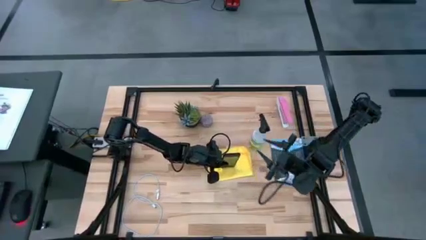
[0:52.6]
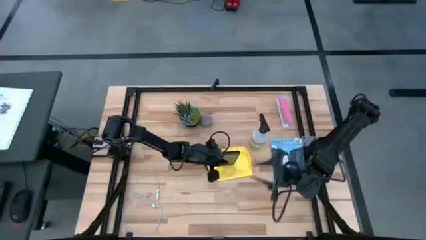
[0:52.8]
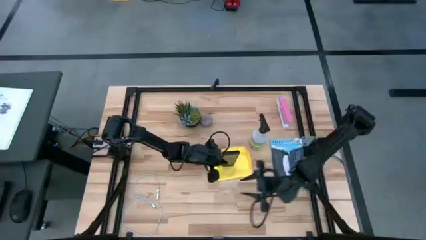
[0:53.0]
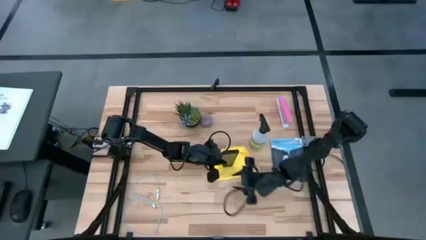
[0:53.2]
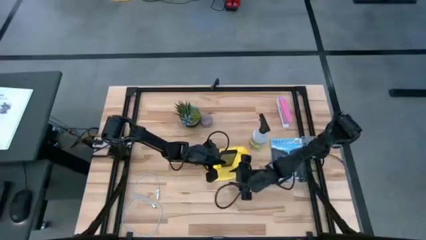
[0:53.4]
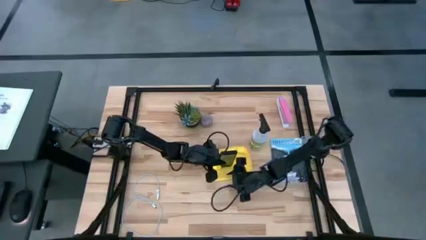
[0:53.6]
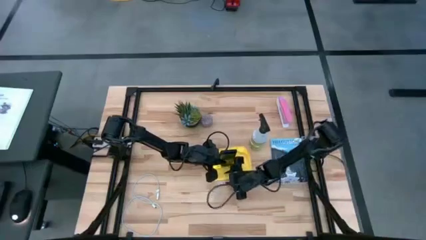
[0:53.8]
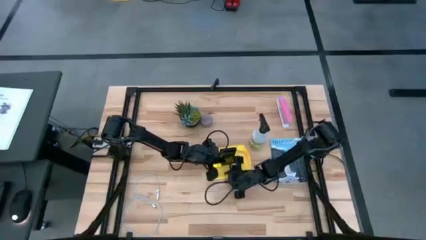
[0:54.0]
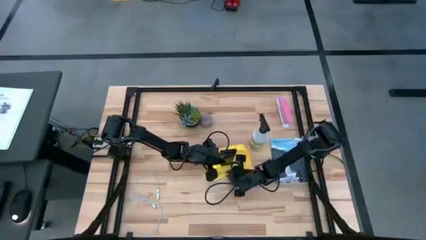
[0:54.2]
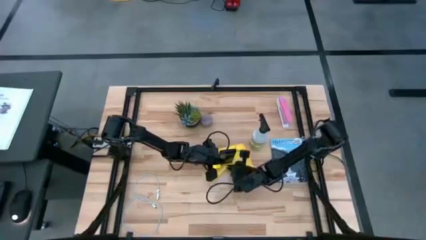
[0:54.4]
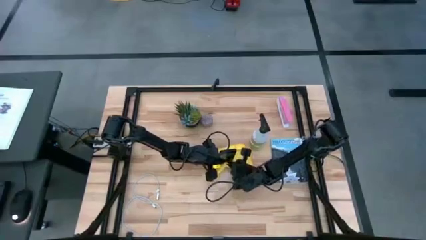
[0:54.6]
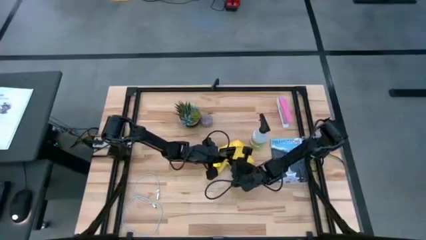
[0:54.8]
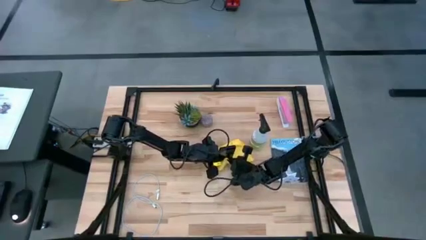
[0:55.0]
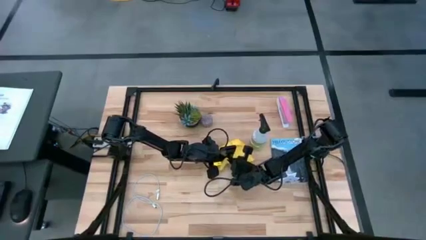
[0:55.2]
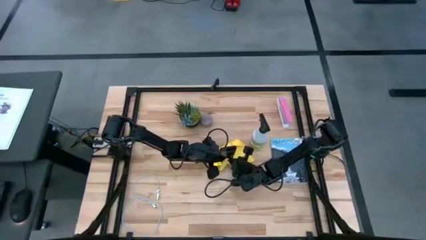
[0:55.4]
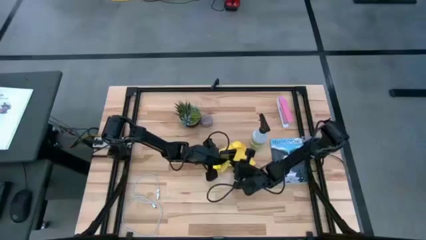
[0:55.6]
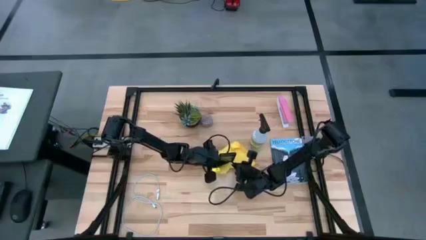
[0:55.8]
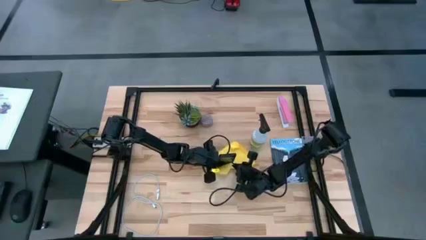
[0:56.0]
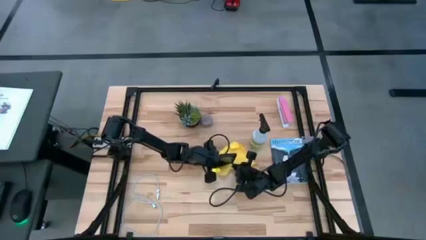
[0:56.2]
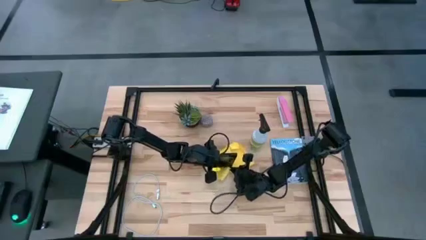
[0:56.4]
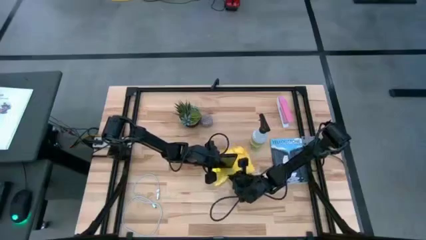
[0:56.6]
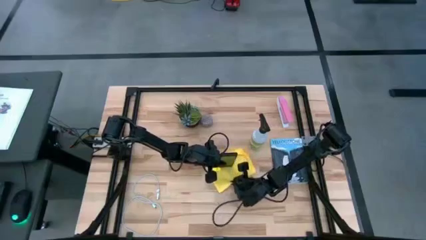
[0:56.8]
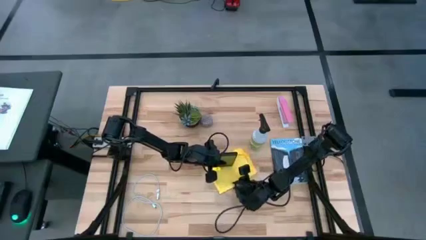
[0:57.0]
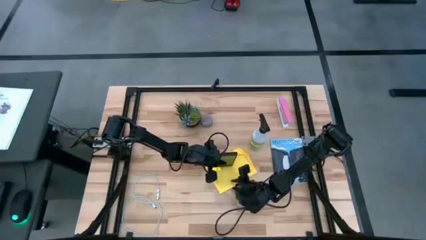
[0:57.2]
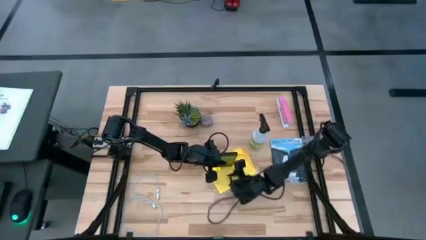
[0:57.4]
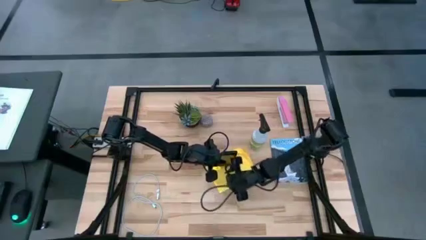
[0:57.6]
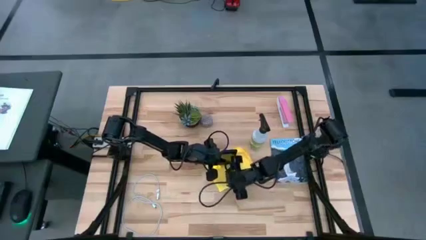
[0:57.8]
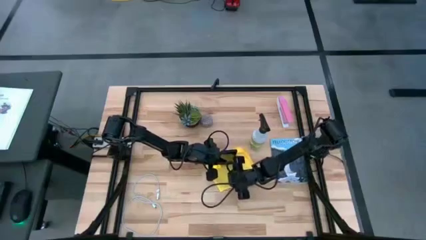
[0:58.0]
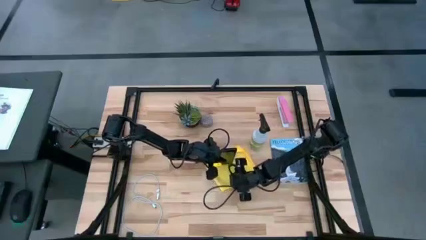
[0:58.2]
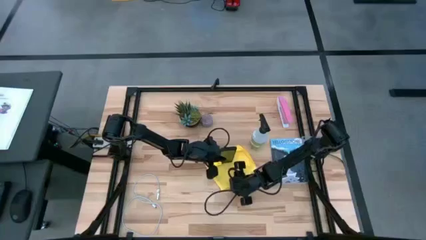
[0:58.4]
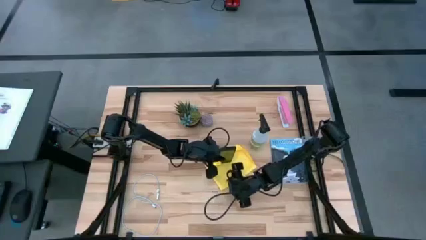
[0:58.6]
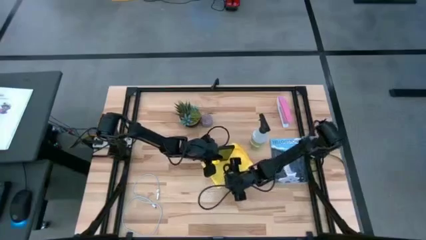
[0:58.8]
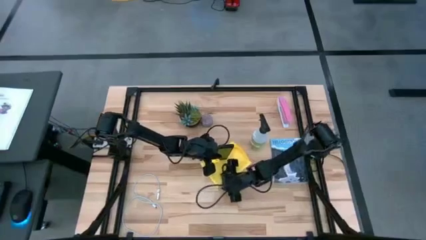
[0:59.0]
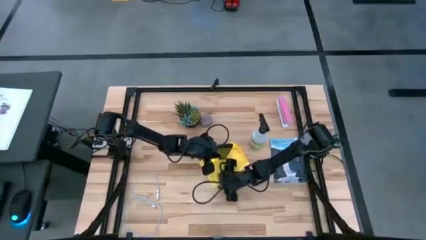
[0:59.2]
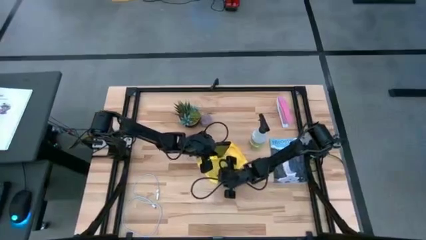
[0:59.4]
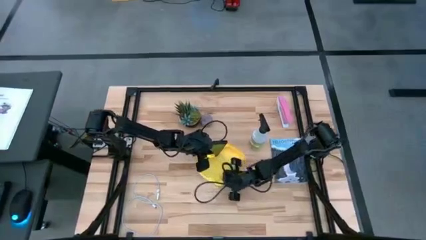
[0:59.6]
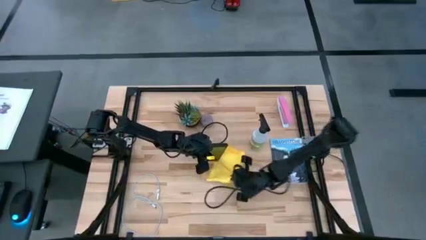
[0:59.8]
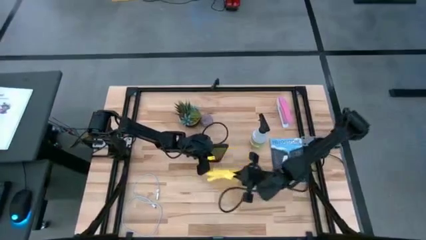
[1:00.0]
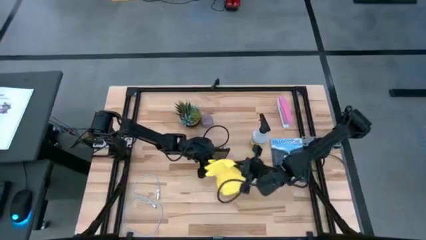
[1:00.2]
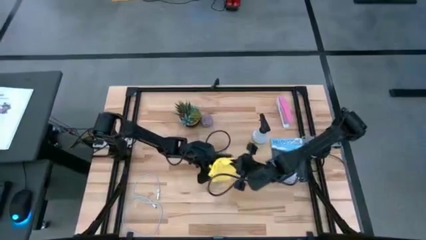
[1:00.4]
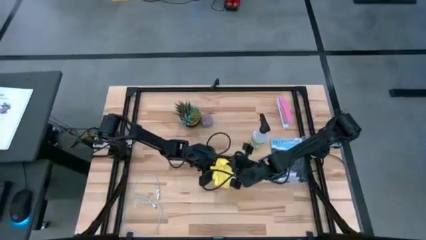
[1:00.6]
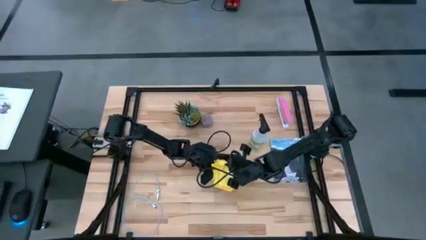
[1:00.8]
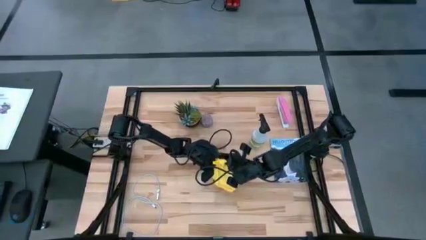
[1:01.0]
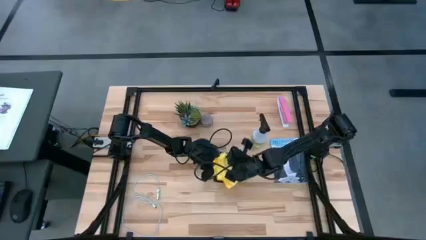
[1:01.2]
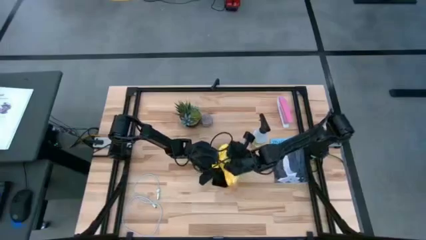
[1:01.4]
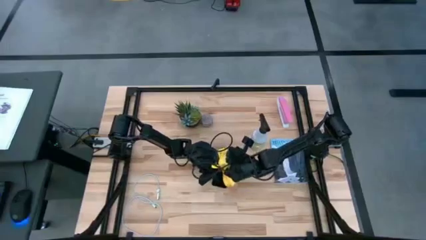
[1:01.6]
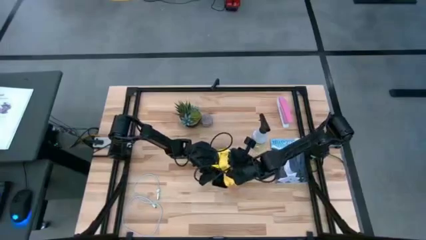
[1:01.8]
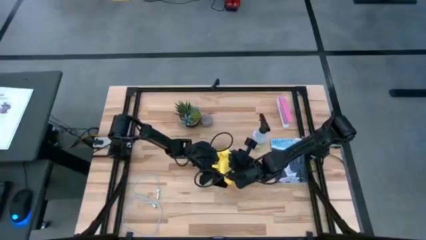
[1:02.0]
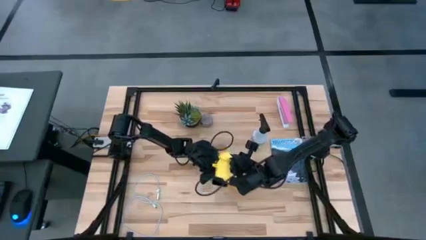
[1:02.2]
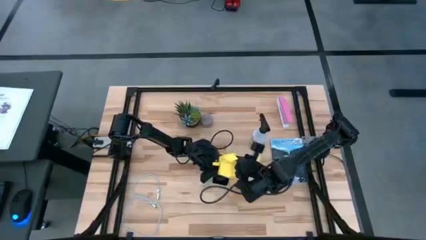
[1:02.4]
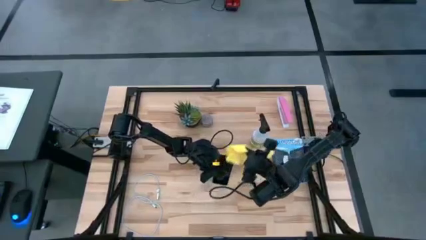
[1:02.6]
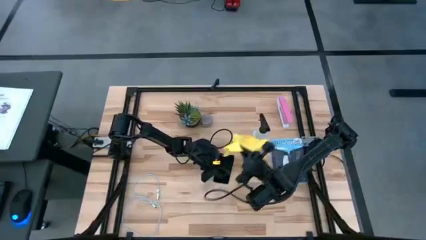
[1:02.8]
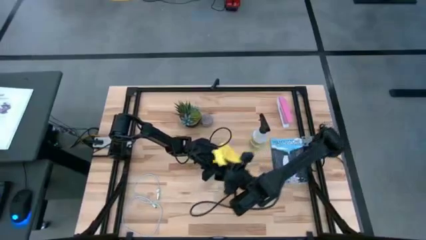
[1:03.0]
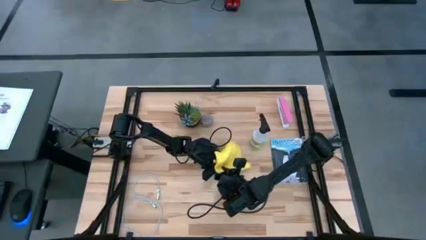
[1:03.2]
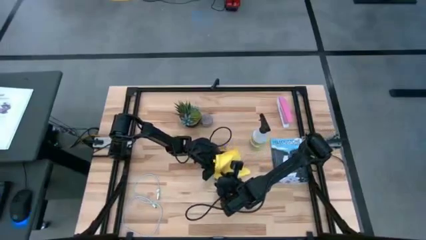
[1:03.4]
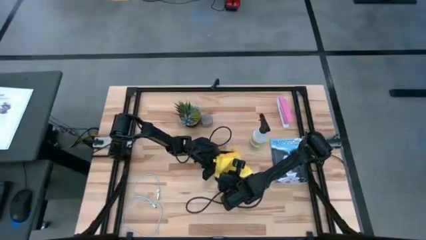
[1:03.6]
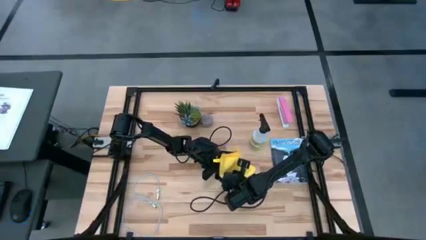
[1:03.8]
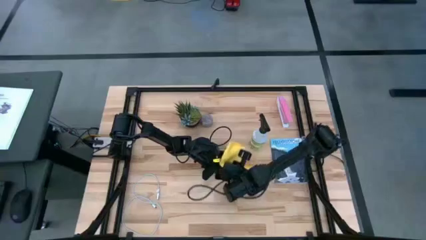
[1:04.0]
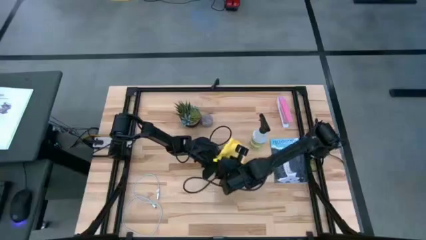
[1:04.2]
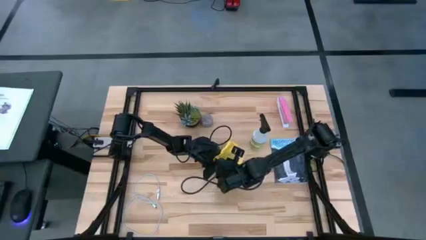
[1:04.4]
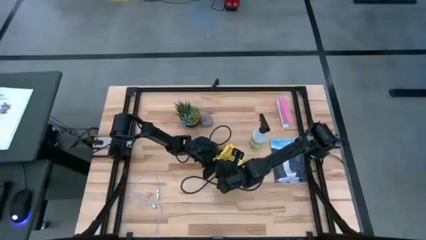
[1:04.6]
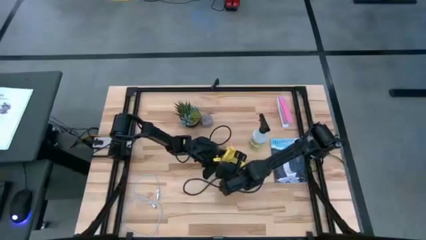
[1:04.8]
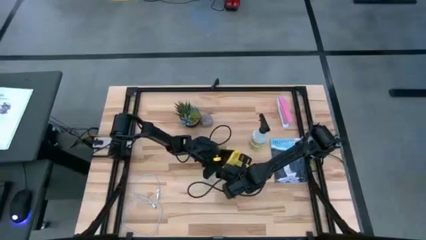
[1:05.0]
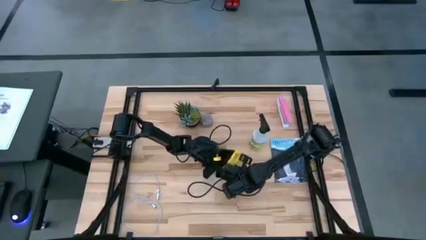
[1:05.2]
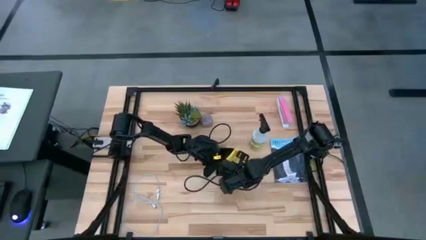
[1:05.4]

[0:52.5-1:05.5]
Task: Apply microfiber cloth
Wipe the front side of the cellphone using the yellow microfiber cloth
